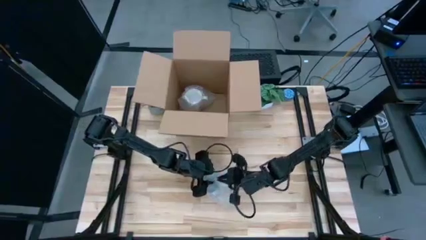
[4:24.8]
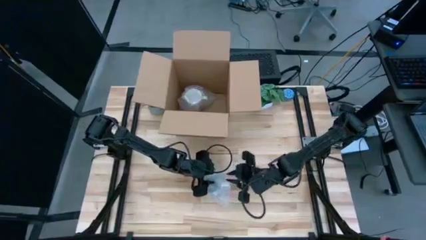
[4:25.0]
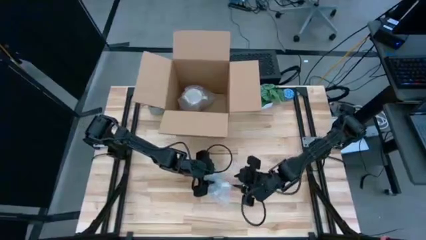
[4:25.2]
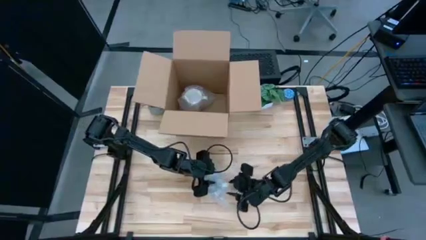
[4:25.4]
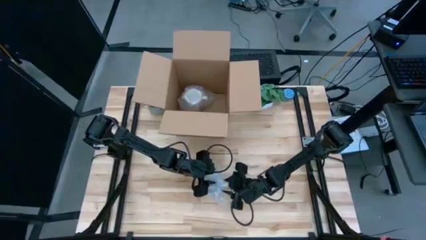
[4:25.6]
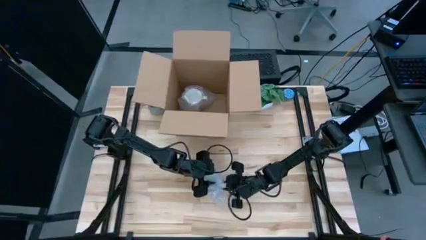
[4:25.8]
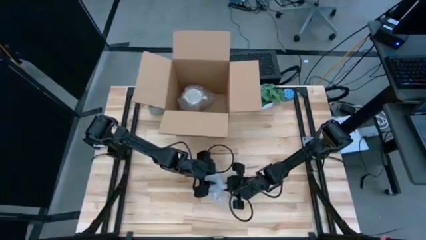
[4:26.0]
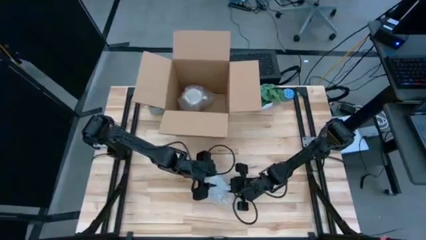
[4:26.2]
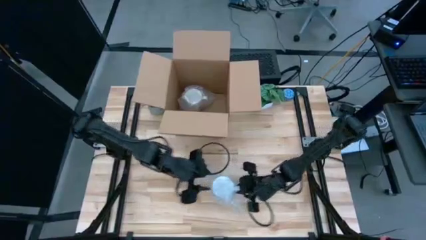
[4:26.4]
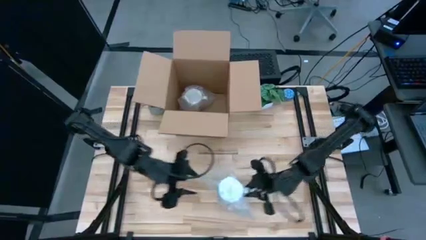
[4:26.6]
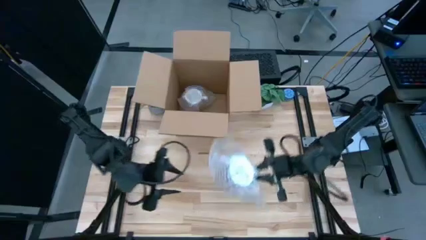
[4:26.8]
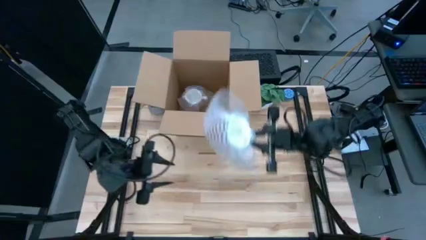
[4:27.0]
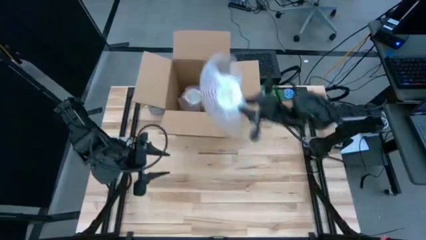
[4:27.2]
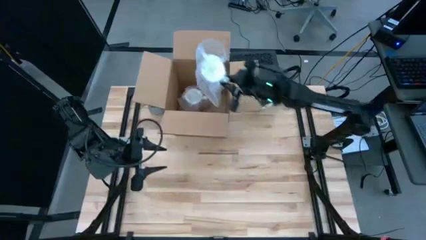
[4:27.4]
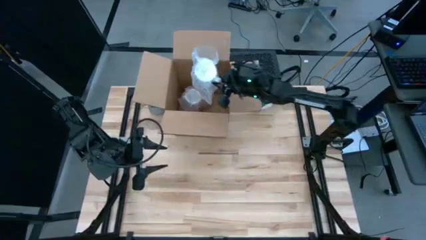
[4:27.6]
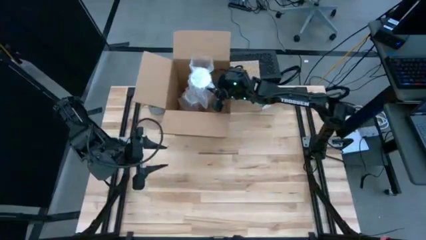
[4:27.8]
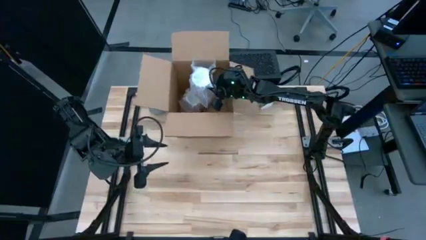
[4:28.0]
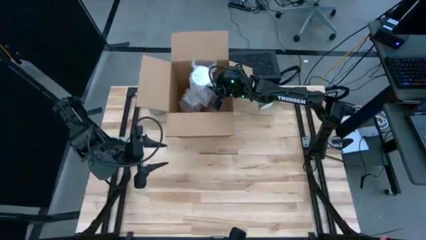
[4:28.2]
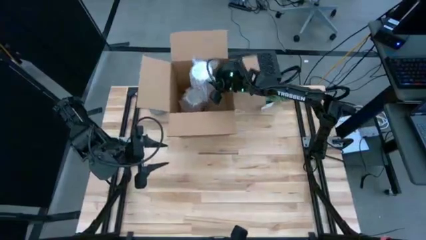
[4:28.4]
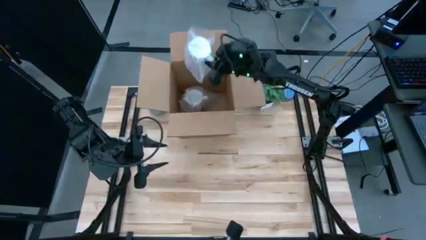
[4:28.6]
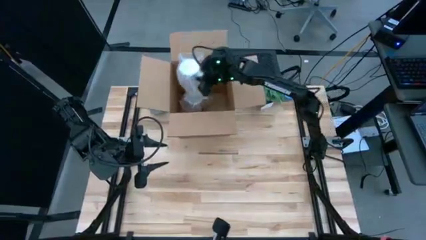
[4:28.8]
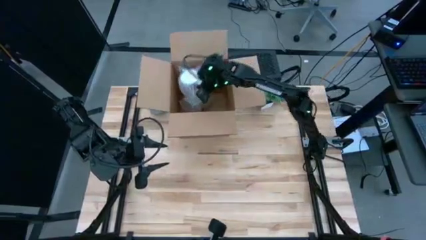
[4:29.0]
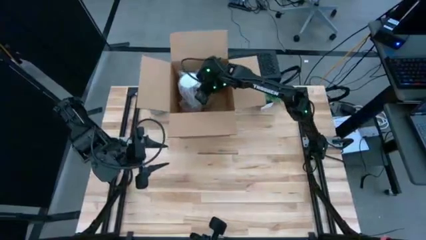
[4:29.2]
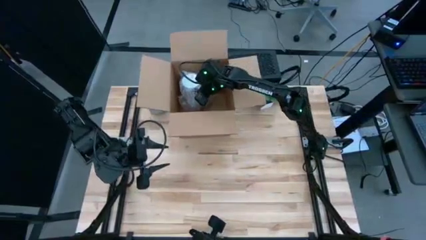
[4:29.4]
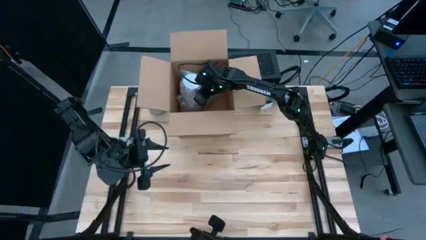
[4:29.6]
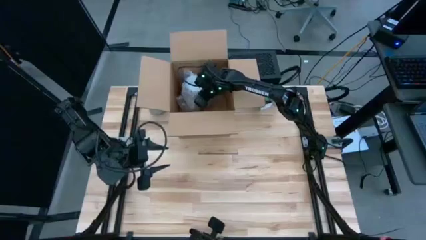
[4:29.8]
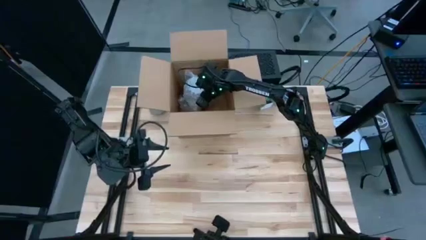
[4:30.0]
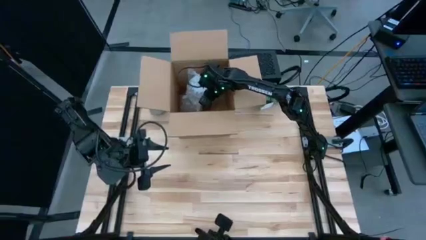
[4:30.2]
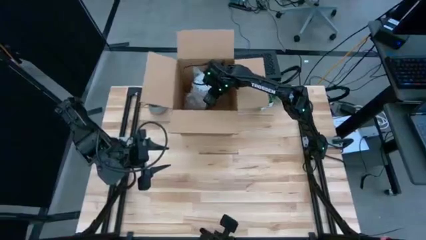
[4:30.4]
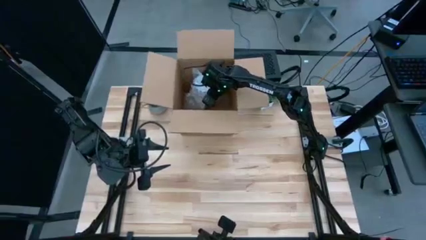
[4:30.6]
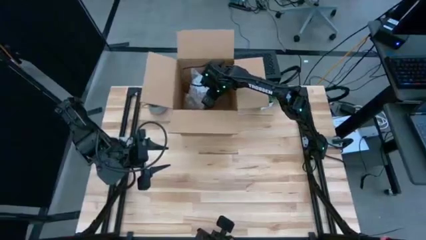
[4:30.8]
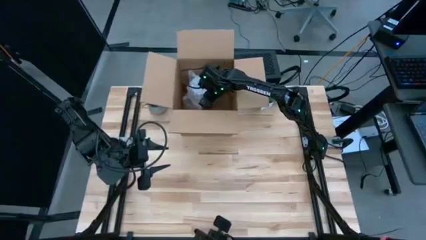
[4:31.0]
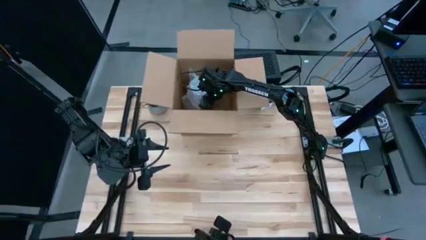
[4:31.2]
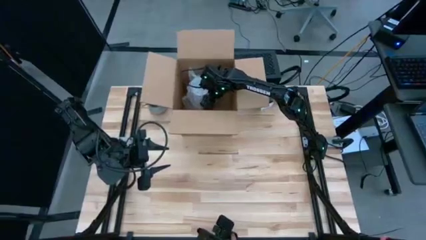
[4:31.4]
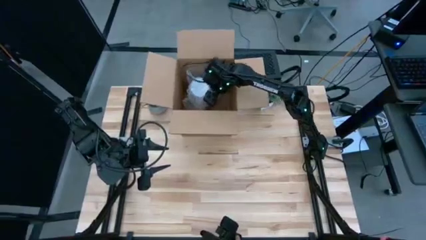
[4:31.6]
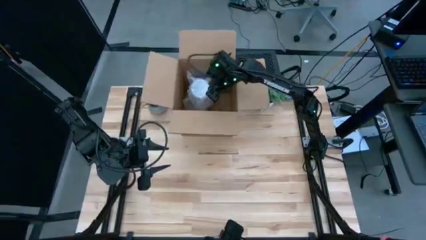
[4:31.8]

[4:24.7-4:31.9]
Task: wrap mug
Put the wrapped red mug into the cardboard box

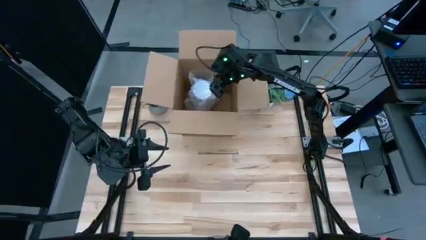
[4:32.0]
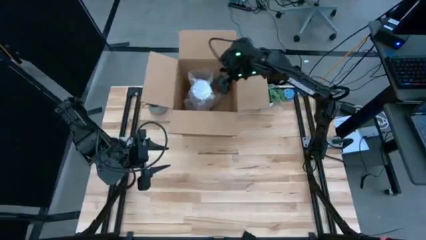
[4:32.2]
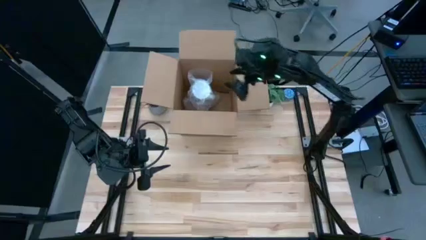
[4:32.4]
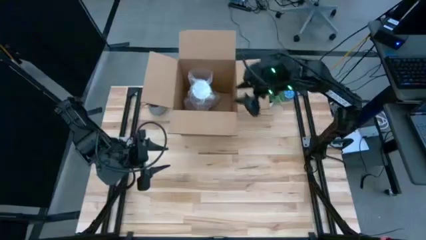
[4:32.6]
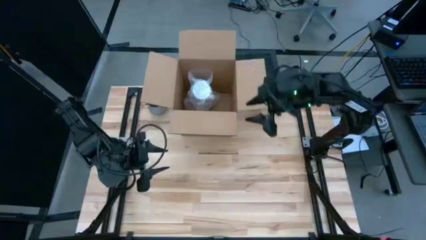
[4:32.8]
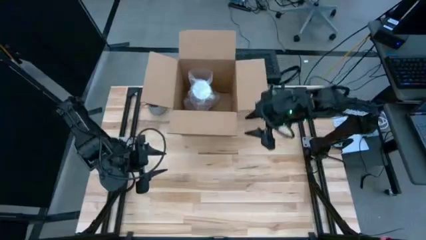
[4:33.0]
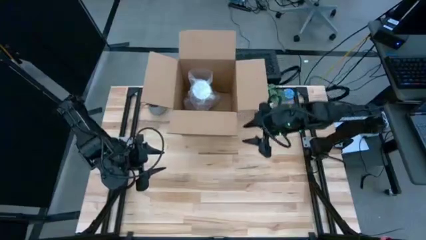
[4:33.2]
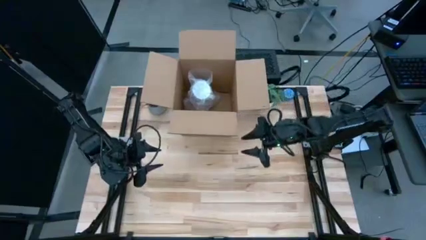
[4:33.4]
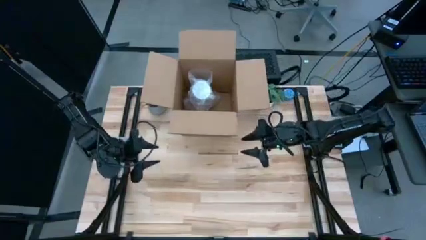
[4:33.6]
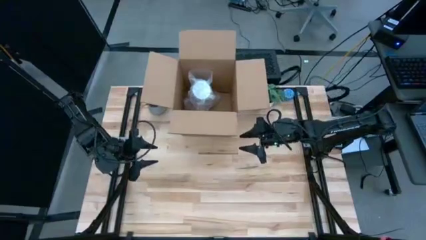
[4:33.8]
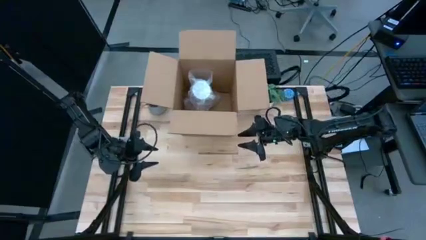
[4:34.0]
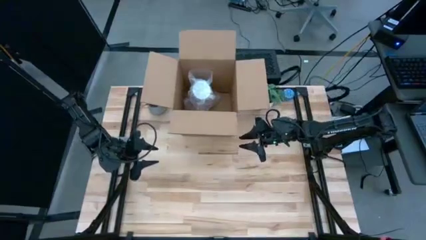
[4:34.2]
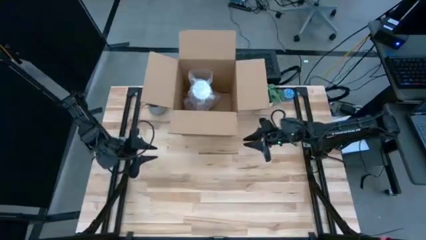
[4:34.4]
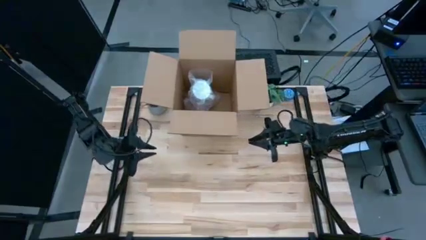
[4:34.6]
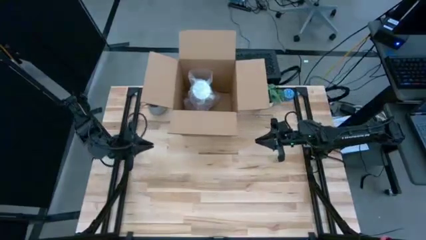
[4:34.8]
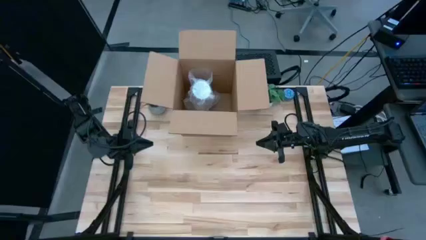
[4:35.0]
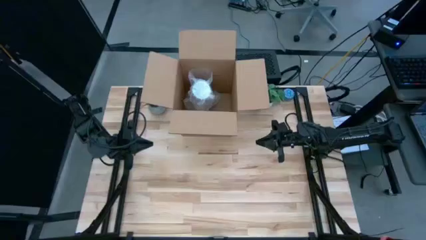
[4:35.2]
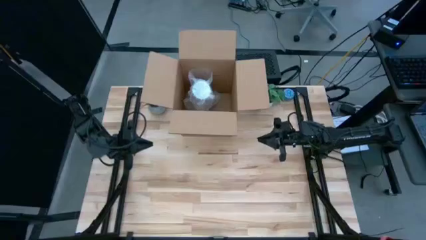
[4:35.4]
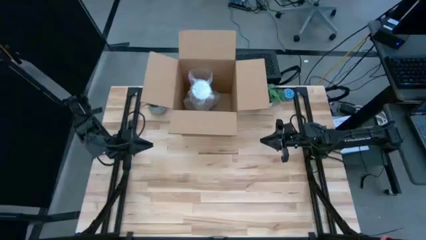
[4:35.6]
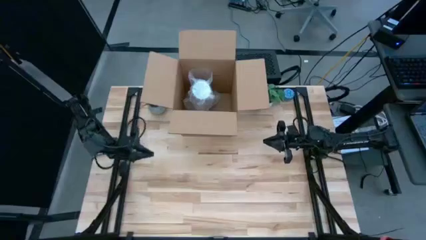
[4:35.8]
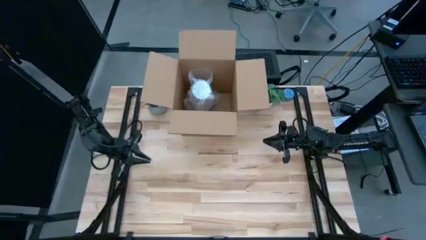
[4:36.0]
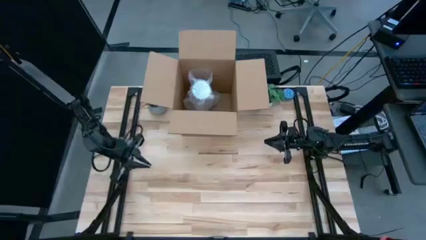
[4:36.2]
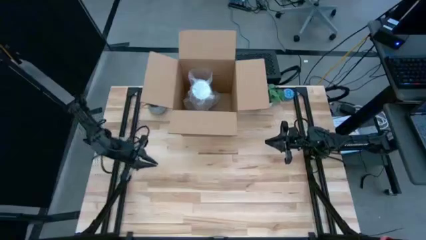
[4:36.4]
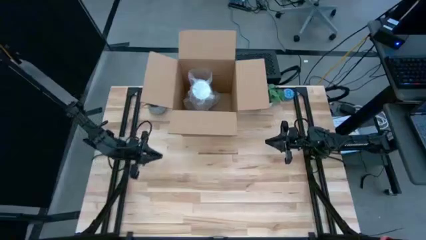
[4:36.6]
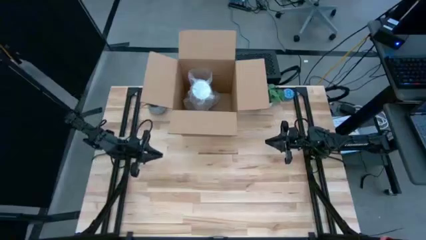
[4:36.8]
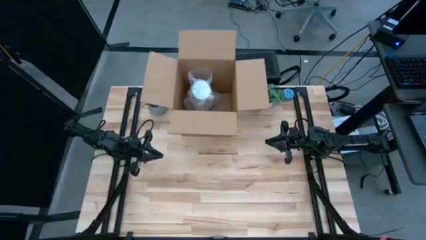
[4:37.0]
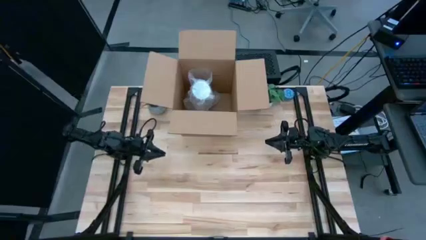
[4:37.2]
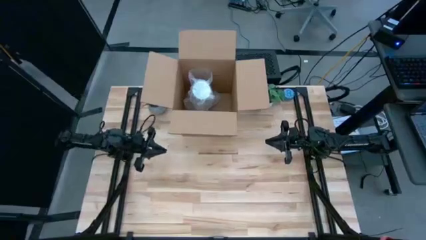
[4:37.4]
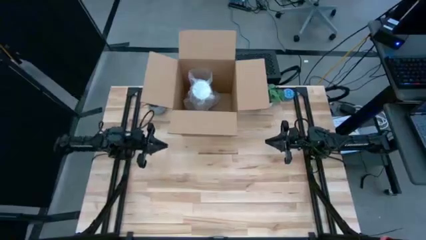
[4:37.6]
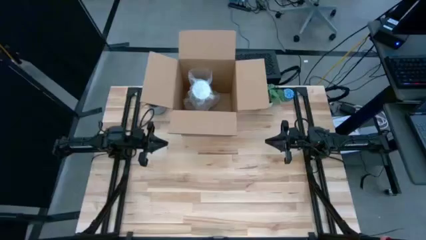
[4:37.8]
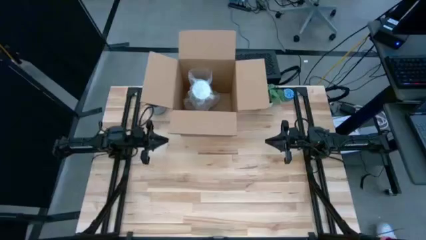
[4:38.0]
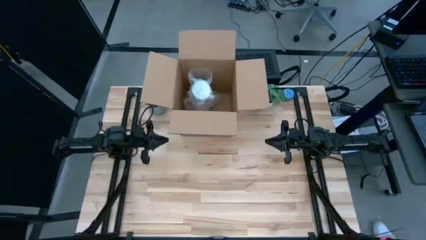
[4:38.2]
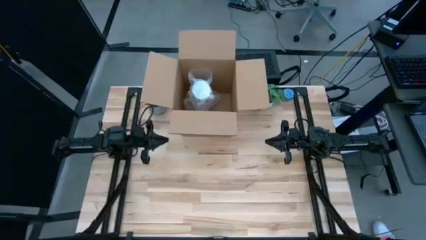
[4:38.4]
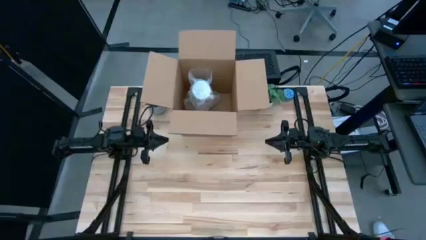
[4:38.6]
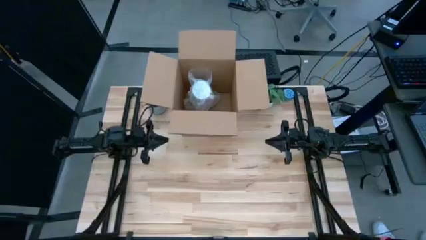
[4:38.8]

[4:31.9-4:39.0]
Return to Home Position

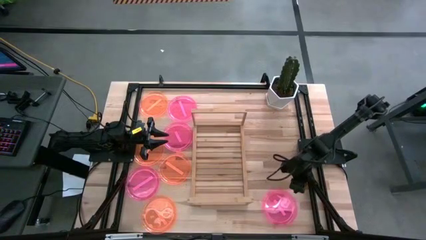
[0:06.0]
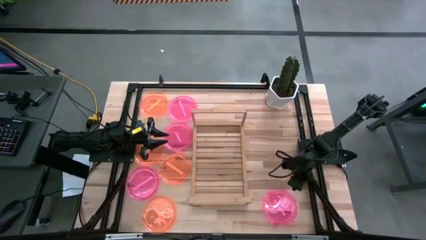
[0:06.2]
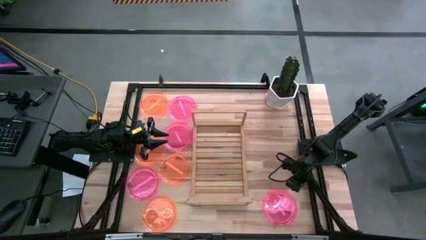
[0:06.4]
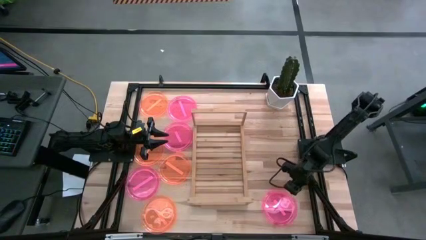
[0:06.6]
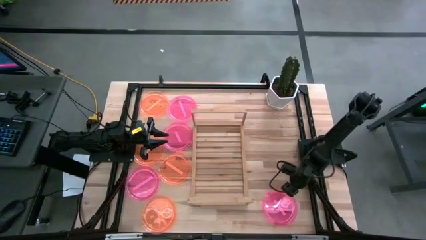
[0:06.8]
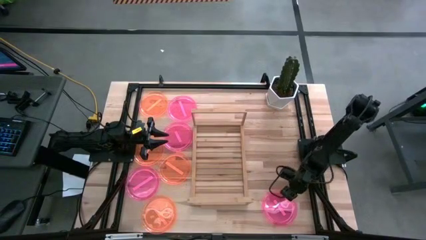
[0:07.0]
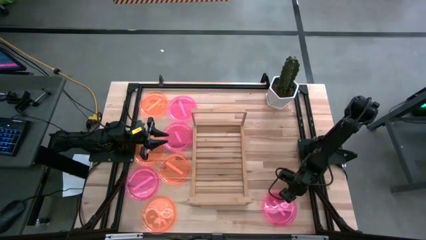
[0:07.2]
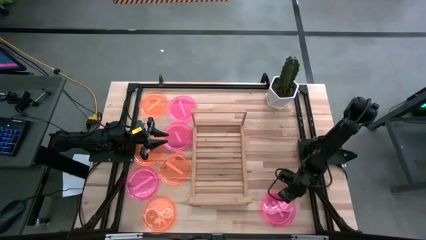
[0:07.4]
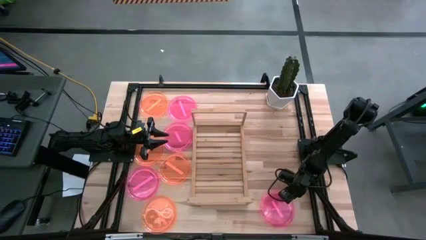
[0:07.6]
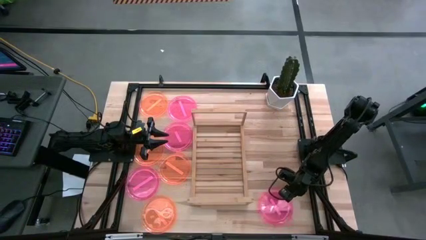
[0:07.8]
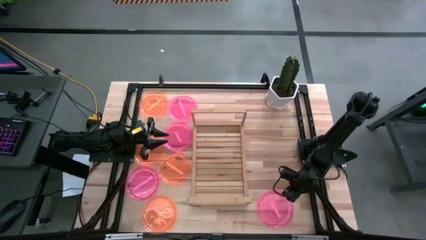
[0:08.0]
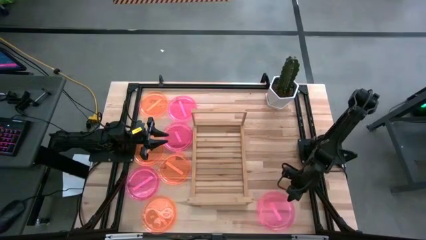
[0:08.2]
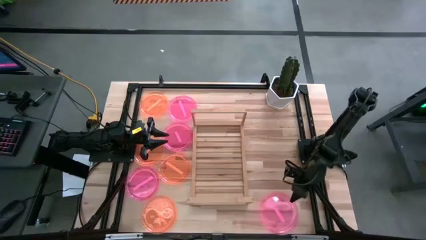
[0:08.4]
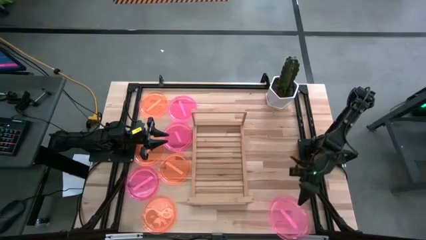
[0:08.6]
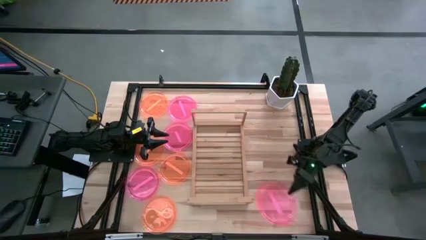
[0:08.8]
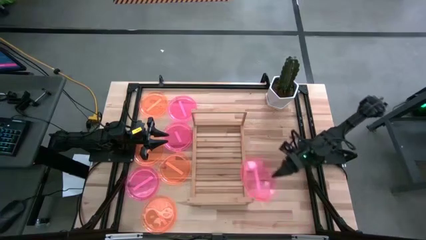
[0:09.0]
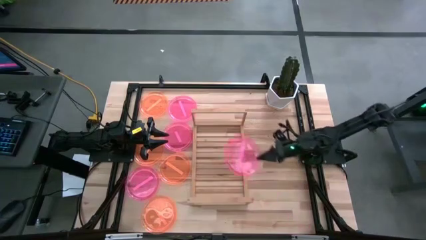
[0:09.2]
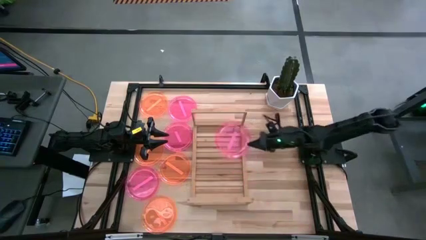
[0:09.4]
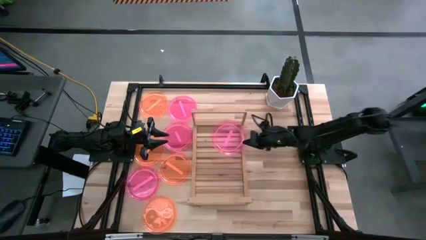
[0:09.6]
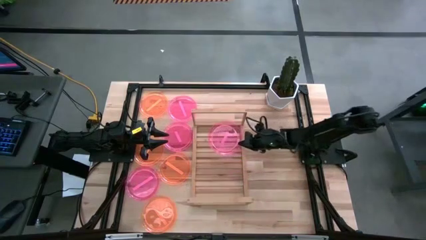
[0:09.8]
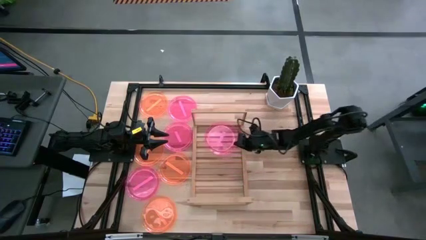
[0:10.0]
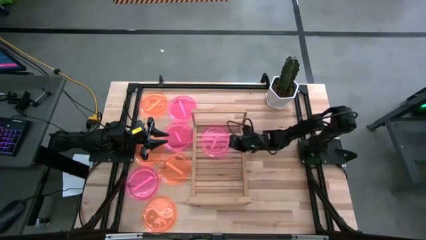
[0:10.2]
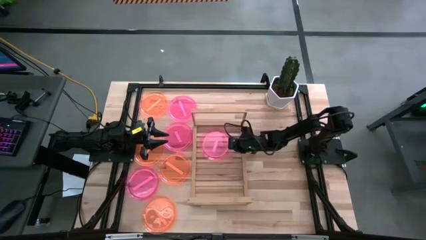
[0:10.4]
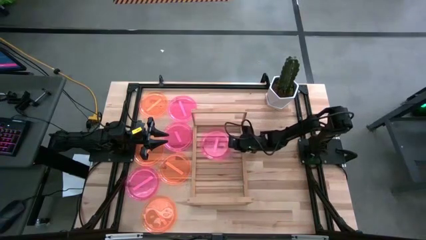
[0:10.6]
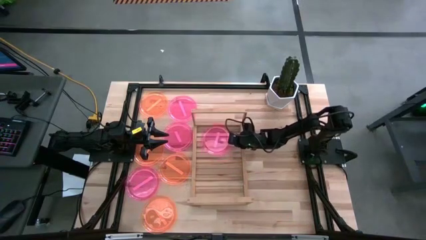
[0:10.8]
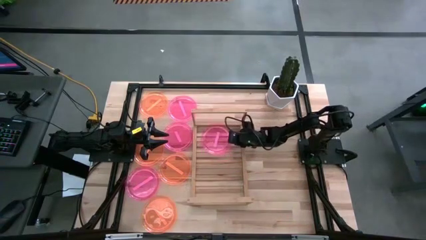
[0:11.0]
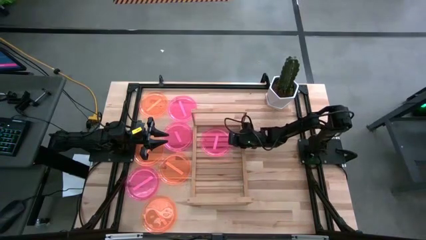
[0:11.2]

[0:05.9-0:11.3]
Task: Place and stack plates onto a shelf
Put the pink plate on the shelf
